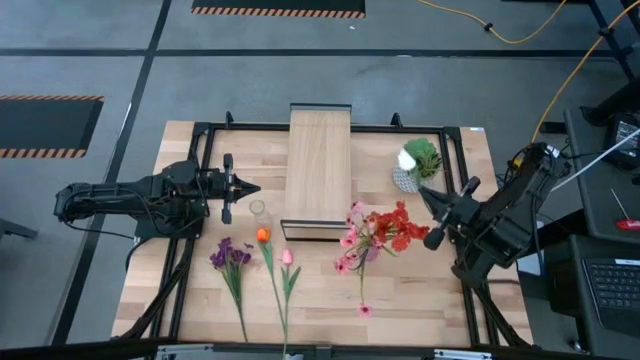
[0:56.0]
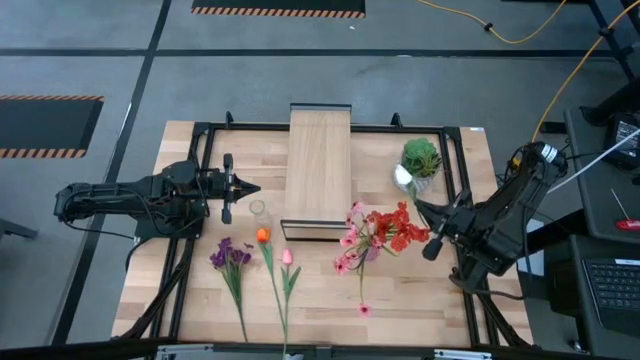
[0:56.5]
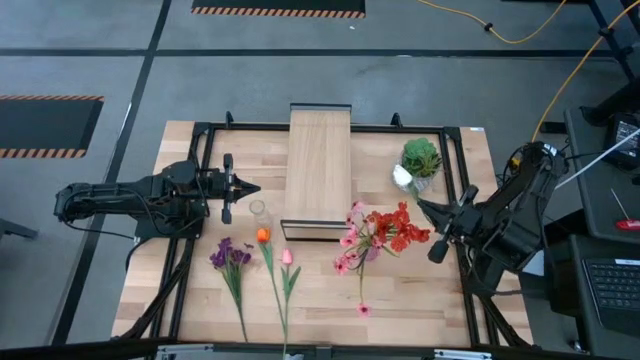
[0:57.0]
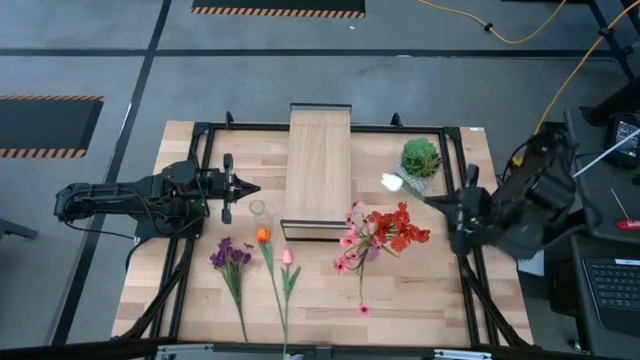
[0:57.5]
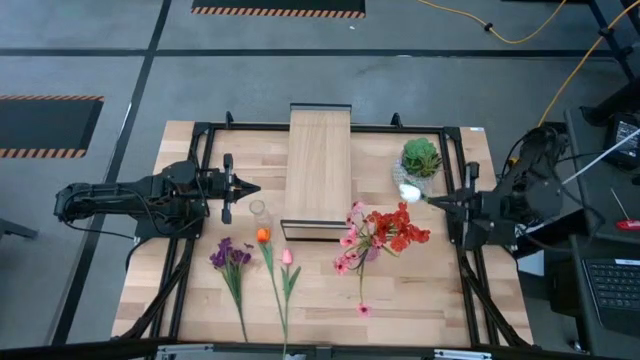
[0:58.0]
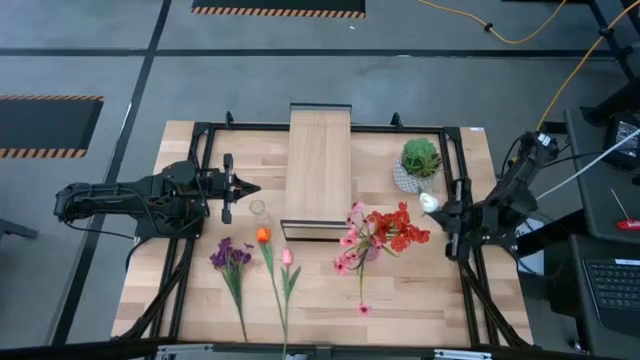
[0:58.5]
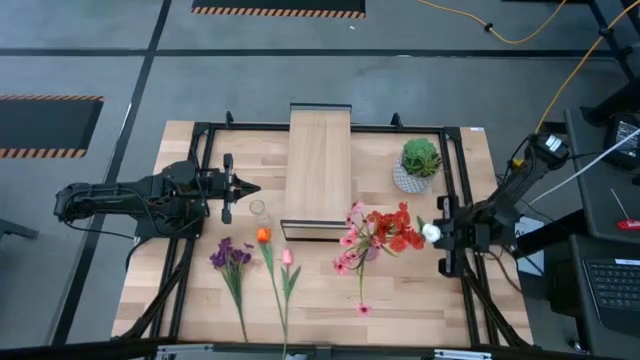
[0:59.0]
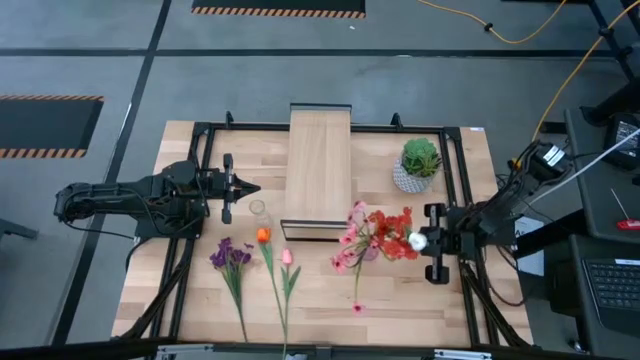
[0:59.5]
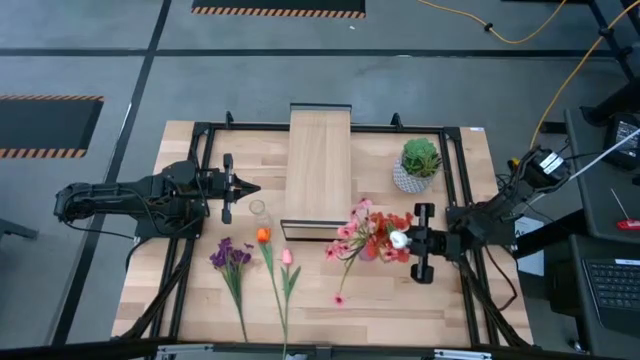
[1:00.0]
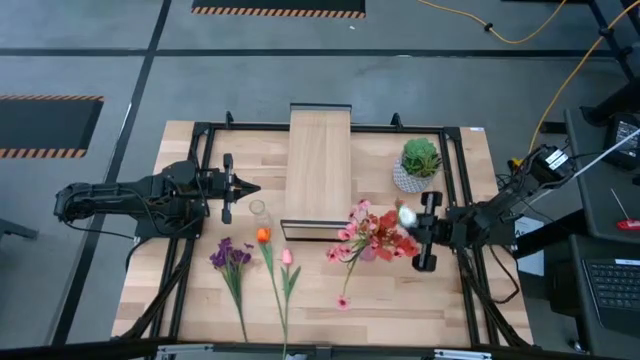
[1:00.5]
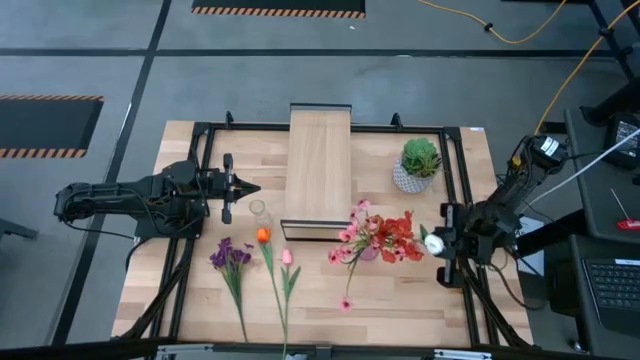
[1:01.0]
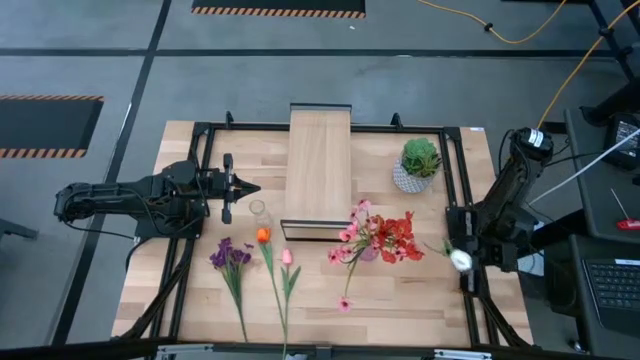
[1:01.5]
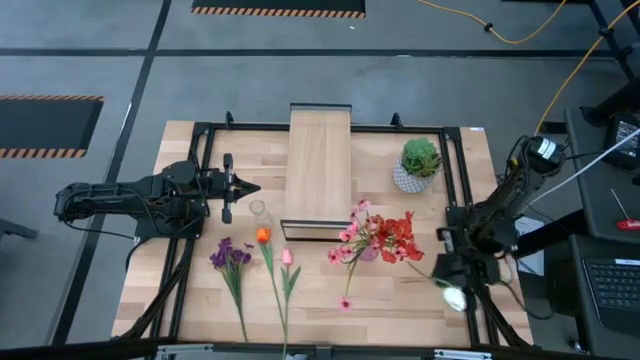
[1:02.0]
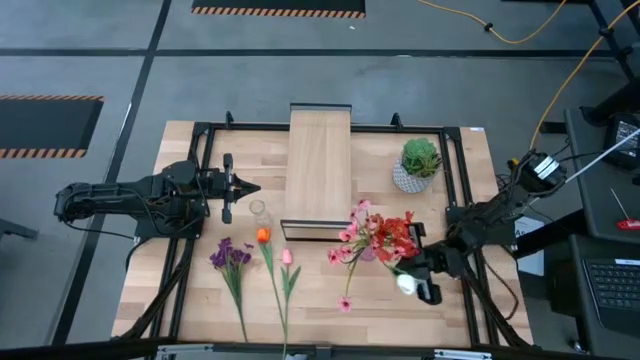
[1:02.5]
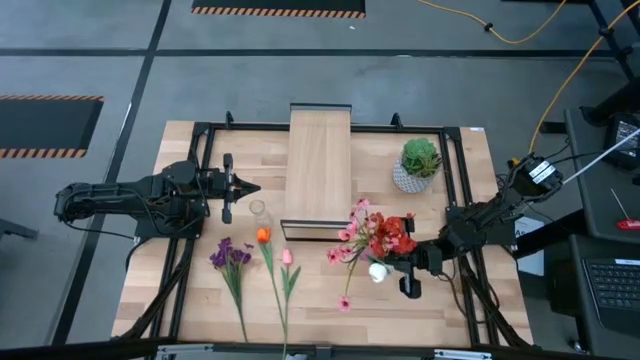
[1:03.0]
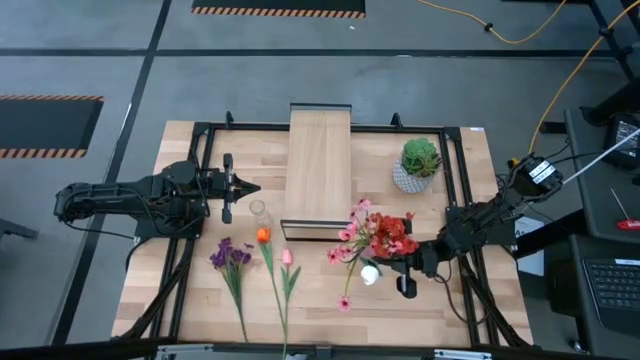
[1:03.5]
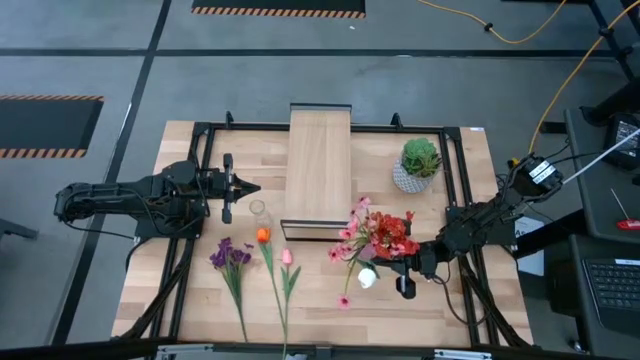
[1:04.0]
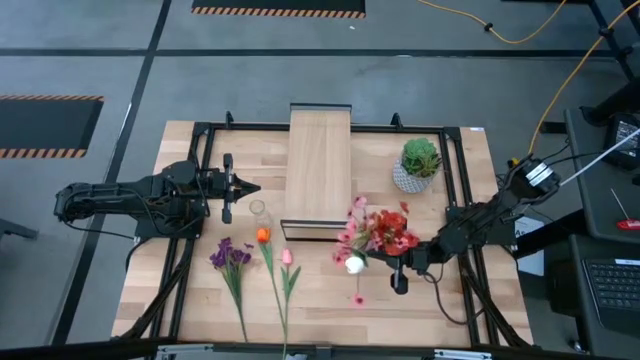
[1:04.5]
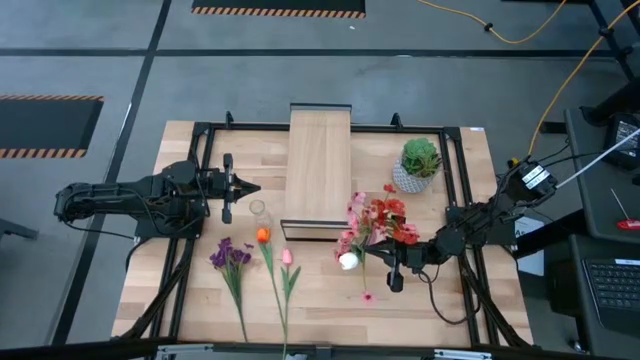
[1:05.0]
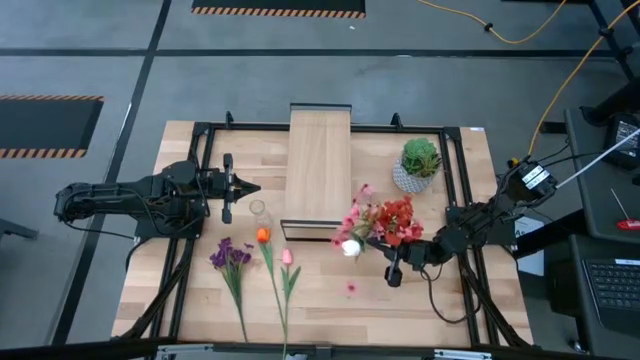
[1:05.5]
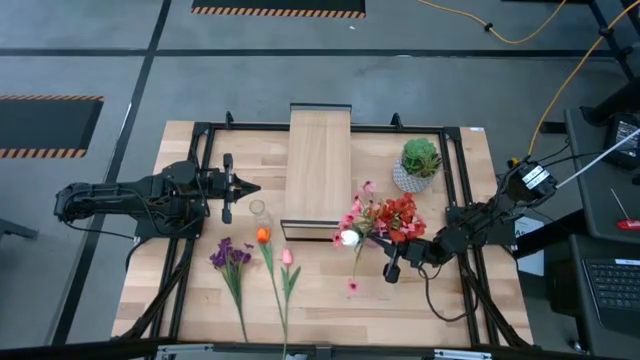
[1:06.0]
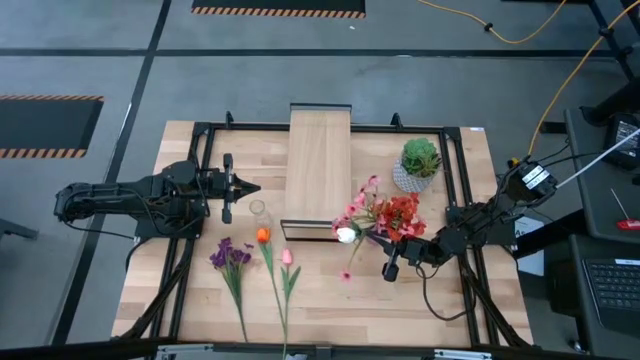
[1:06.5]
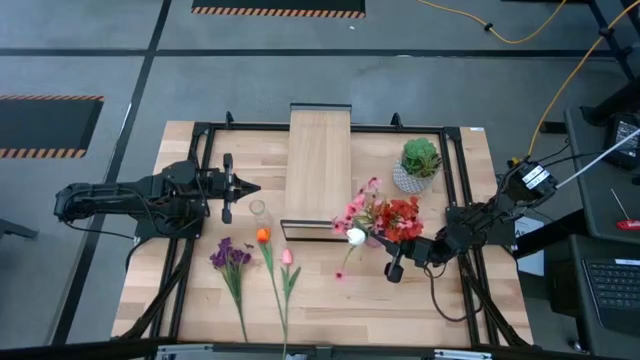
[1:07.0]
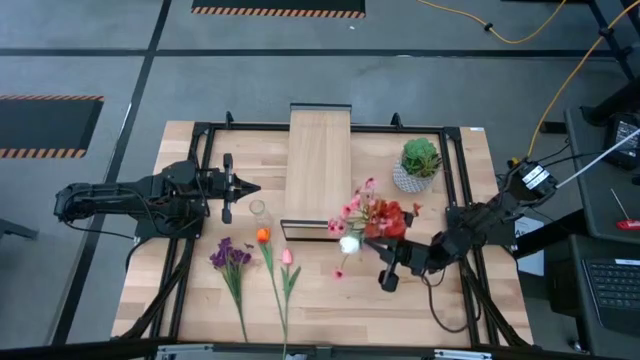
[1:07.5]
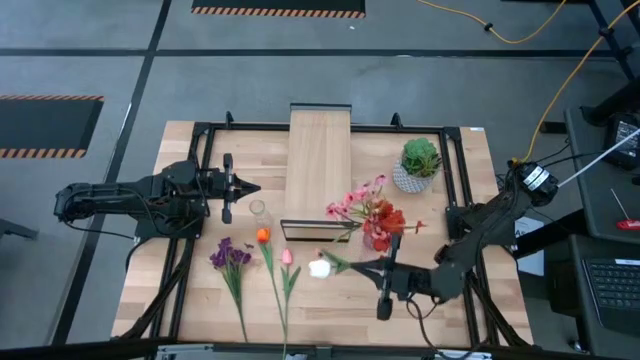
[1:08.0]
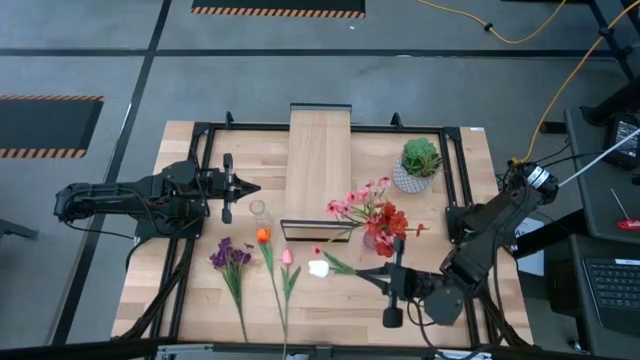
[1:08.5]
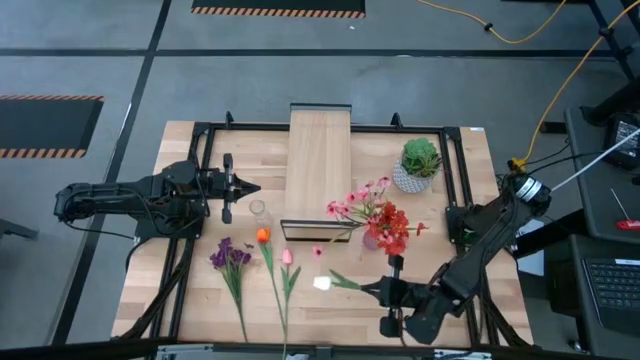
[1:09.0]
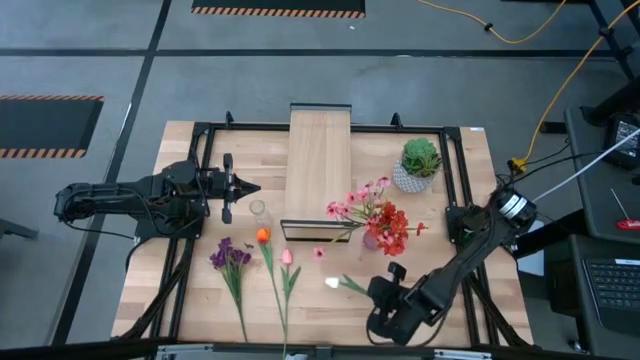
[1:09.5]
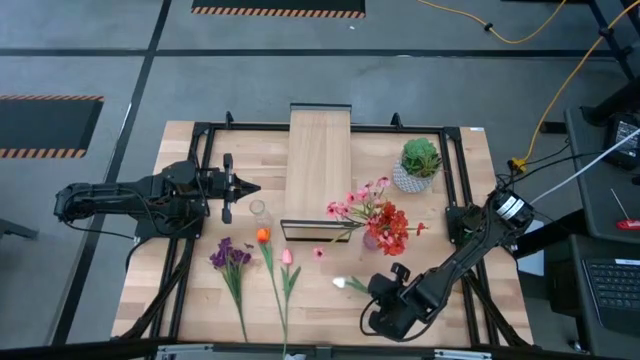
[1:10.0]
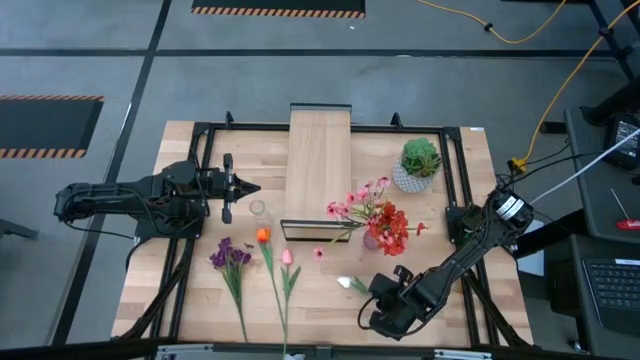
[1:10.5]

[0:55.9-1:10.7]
Task: Pick and place flowers into a vace then onto a shelf
Put the white tulip into the purple vase

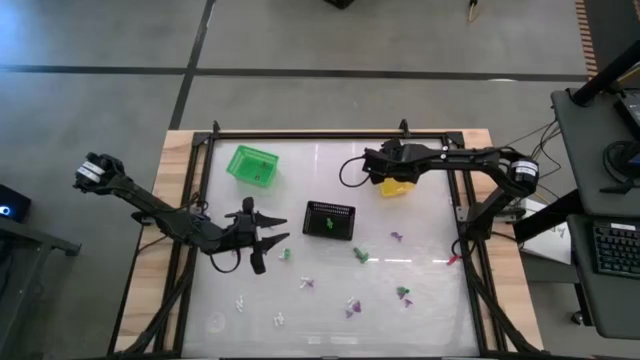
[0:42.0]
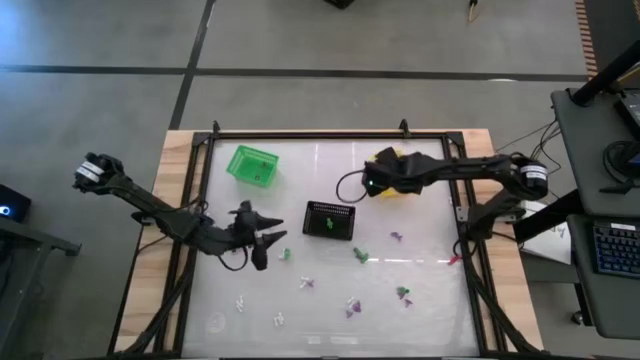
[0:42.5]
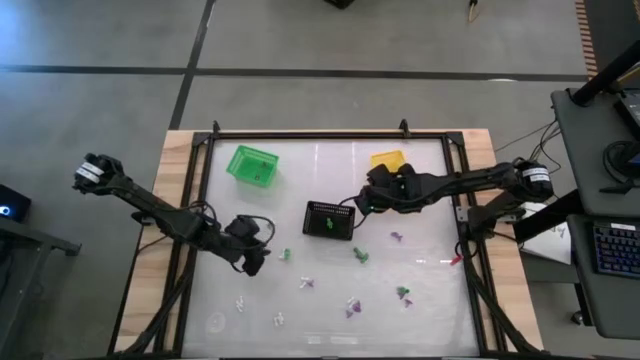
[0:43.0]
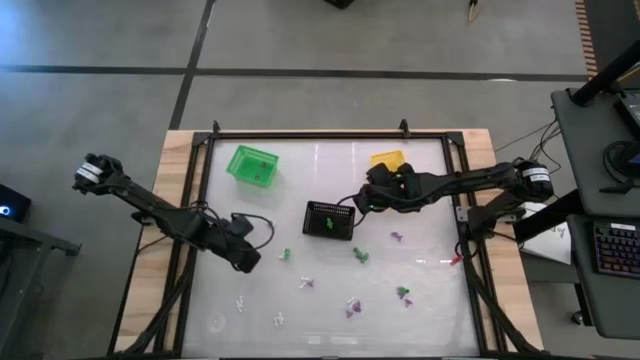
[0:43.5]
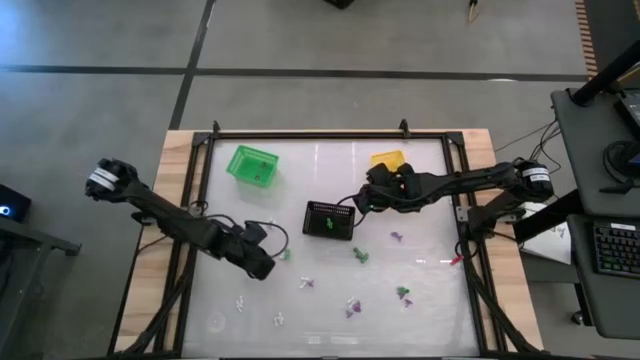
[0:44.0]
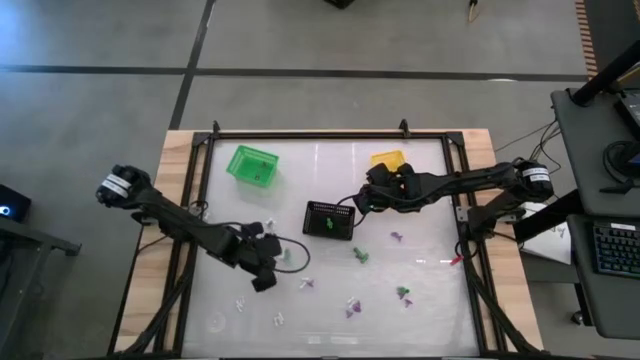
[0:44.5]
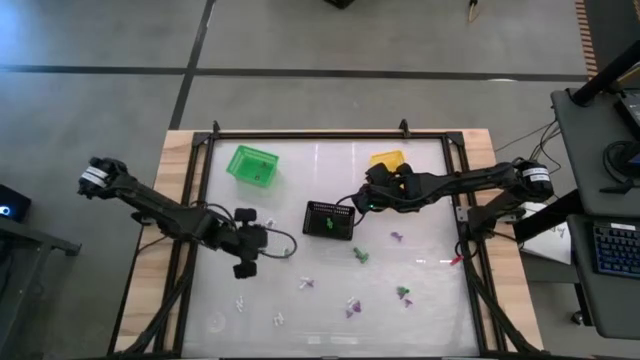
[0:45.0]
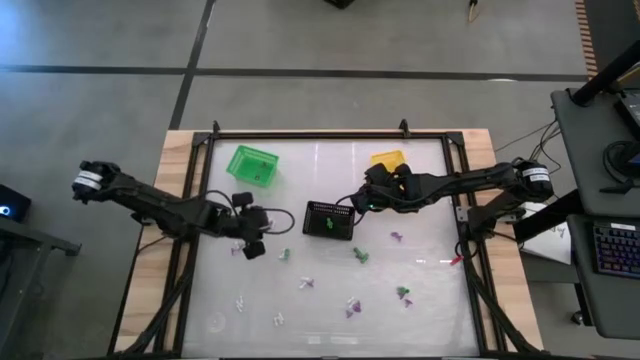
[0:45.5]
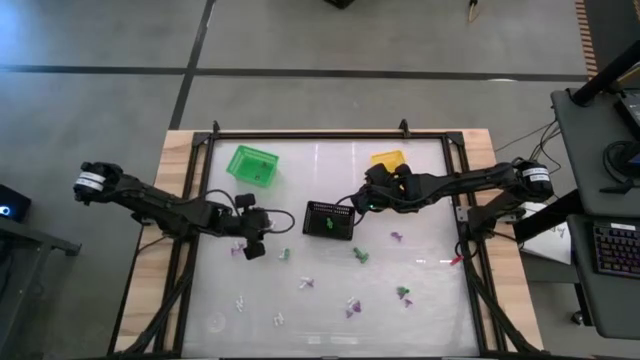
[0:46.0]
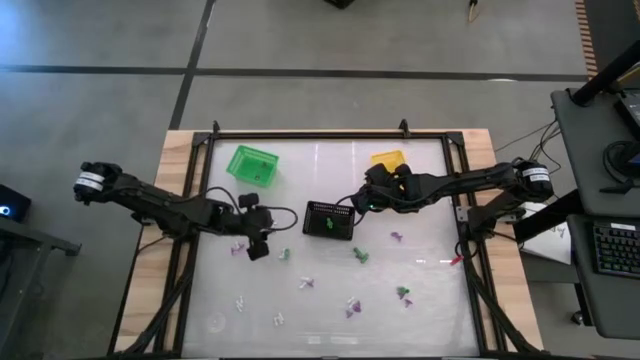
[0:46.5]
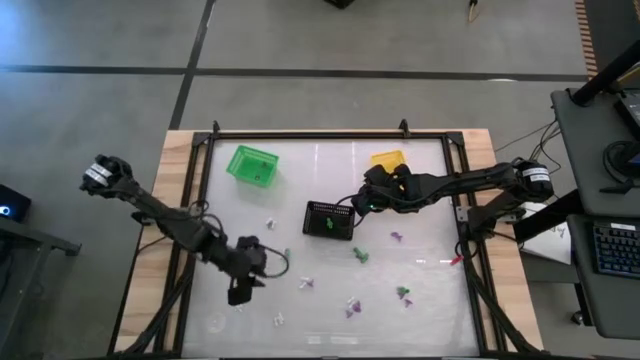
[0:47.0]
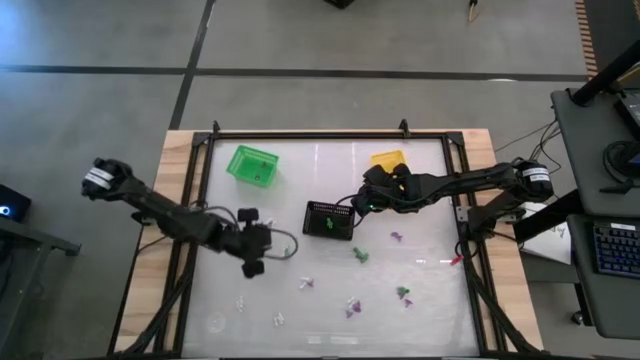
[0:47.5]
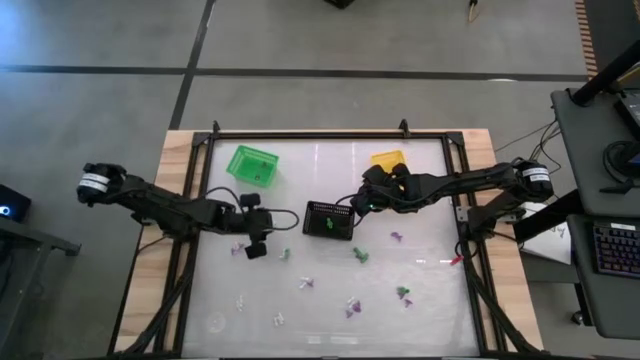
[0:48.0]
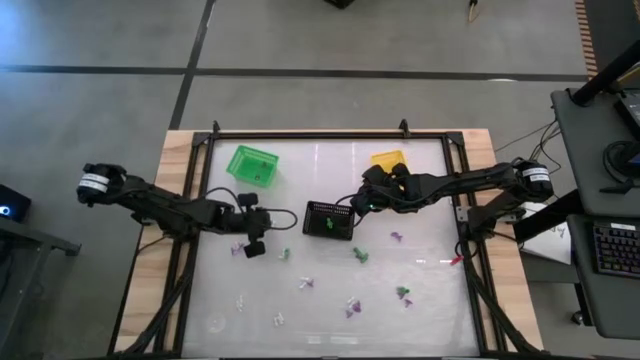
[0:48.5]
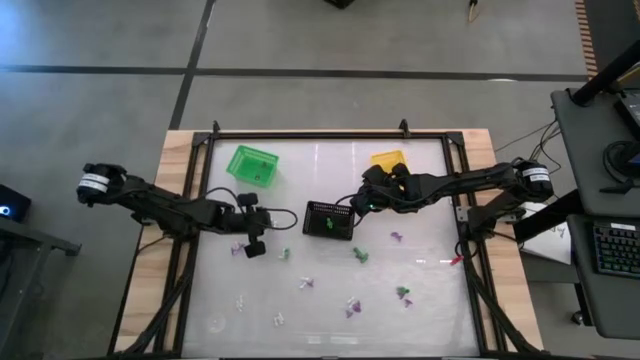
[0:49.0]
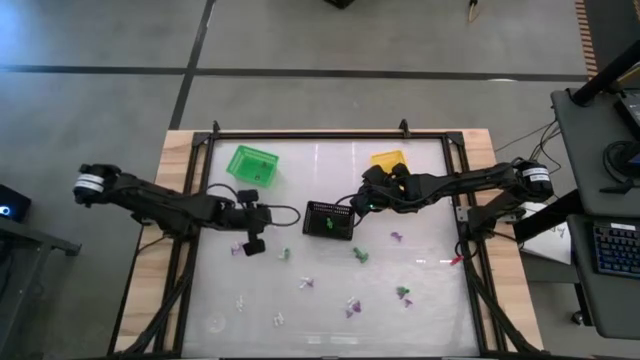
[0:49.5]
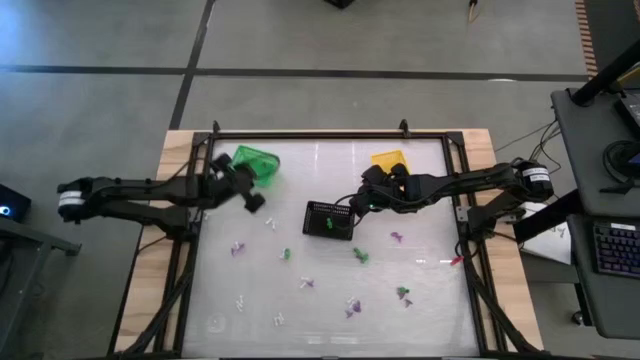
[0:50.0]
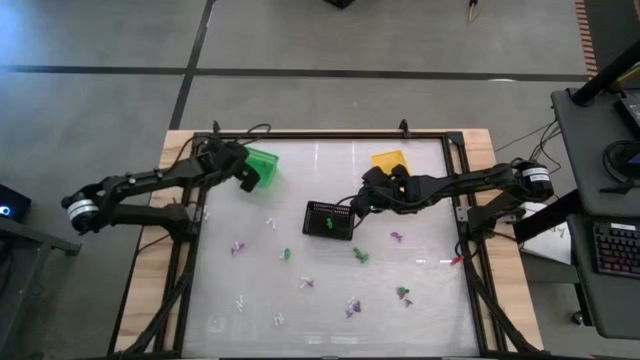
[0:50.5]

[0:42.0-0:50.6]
Task: Sort Halloween decoration
Put the purple witch hat toy into the green bin
